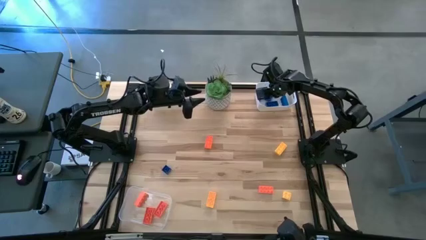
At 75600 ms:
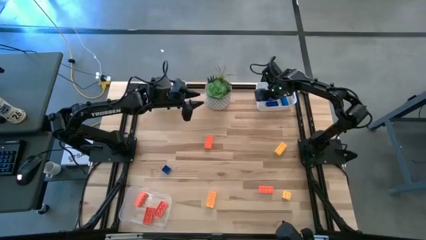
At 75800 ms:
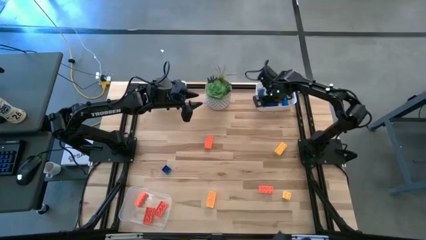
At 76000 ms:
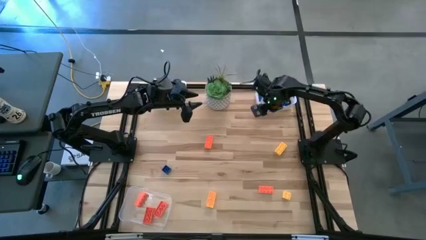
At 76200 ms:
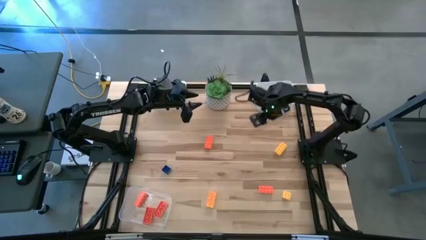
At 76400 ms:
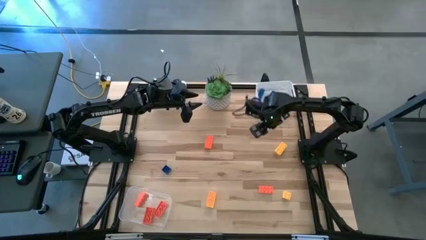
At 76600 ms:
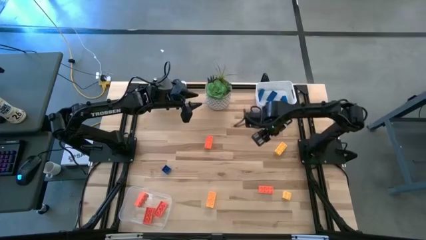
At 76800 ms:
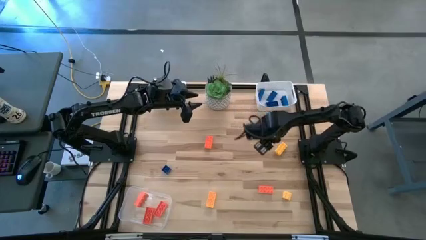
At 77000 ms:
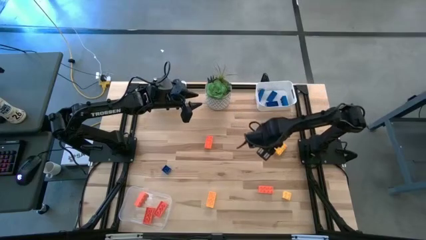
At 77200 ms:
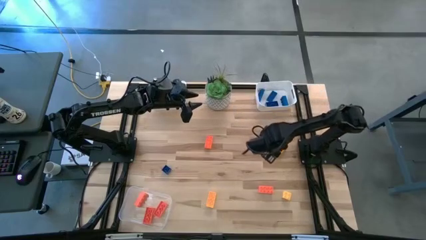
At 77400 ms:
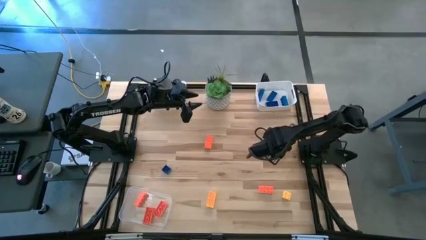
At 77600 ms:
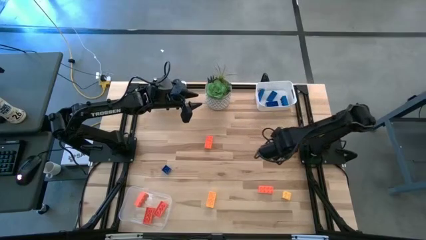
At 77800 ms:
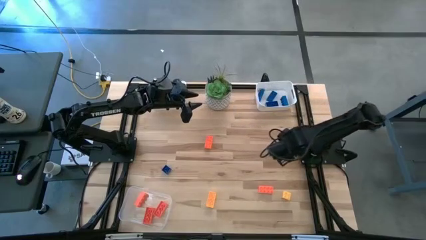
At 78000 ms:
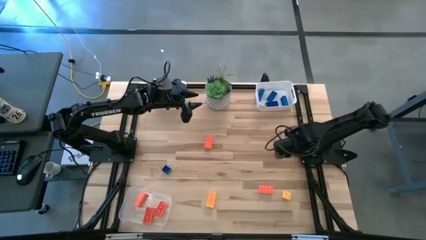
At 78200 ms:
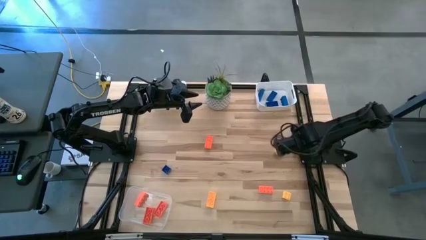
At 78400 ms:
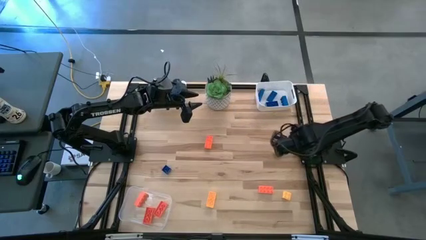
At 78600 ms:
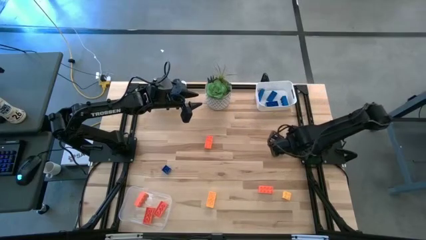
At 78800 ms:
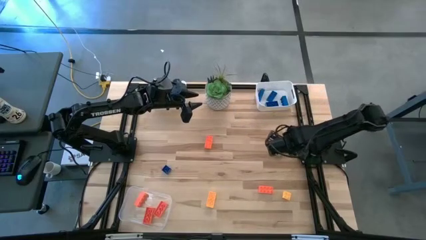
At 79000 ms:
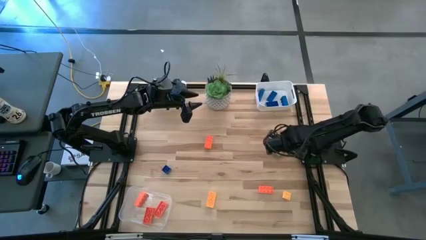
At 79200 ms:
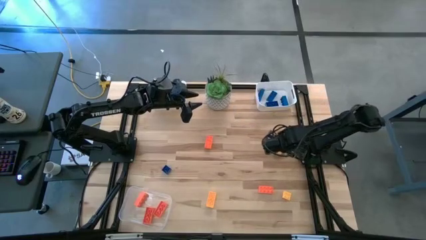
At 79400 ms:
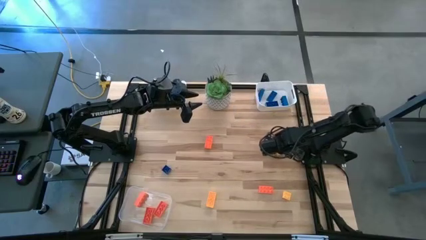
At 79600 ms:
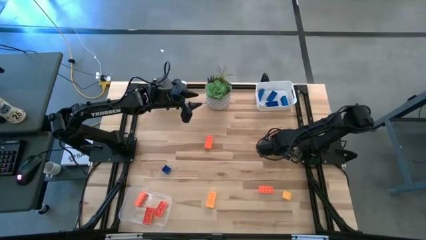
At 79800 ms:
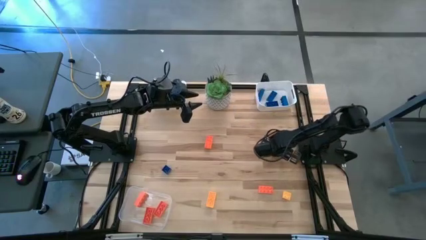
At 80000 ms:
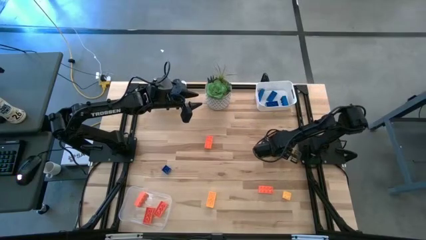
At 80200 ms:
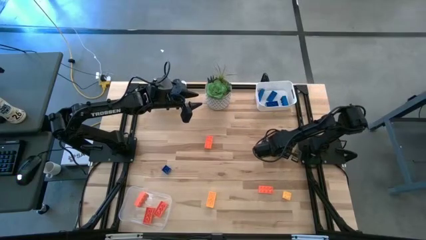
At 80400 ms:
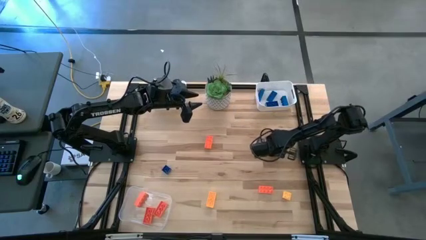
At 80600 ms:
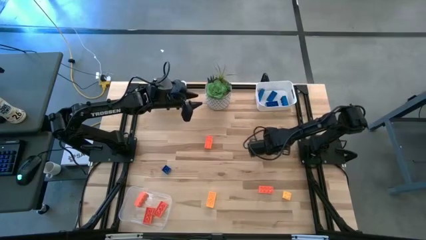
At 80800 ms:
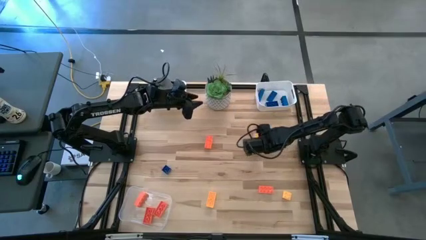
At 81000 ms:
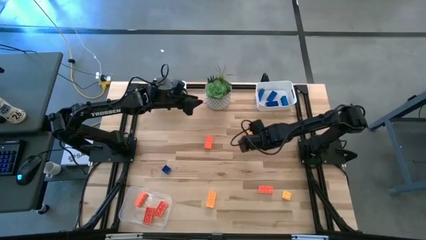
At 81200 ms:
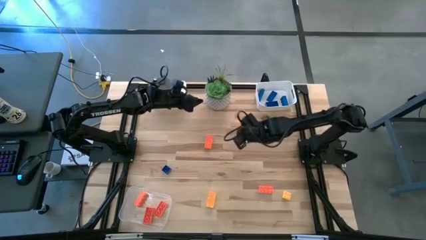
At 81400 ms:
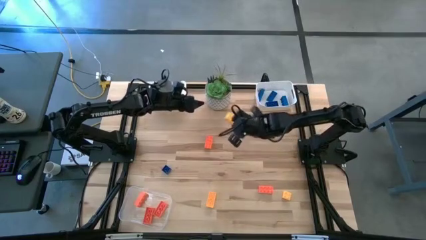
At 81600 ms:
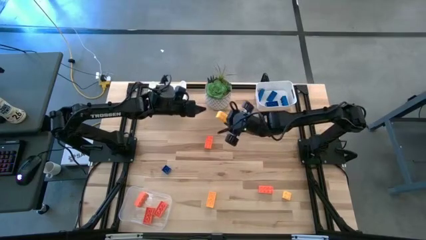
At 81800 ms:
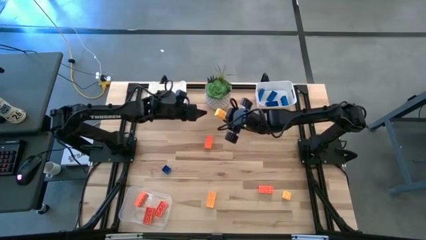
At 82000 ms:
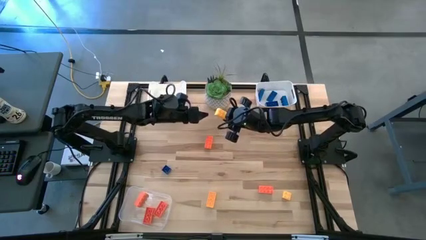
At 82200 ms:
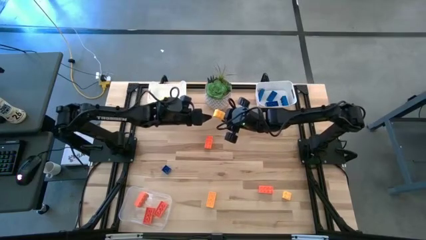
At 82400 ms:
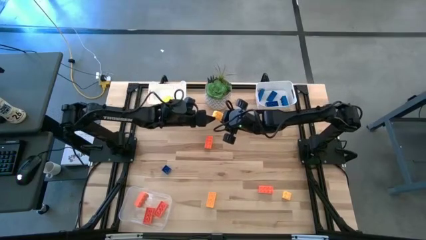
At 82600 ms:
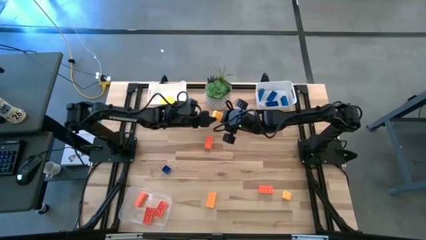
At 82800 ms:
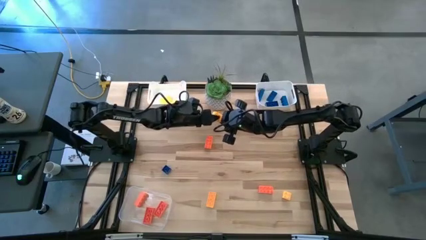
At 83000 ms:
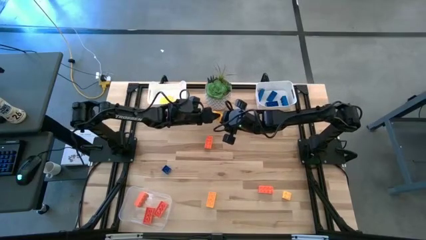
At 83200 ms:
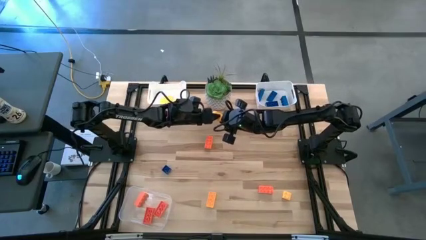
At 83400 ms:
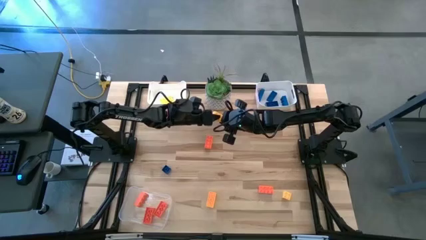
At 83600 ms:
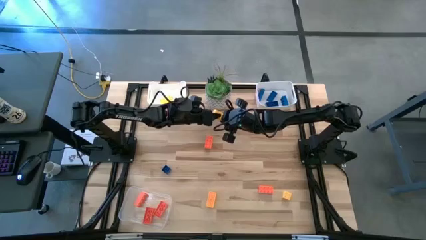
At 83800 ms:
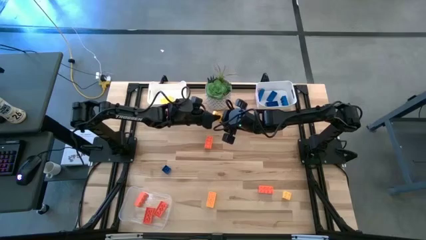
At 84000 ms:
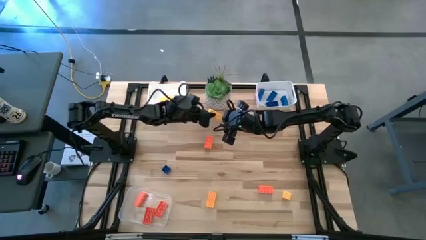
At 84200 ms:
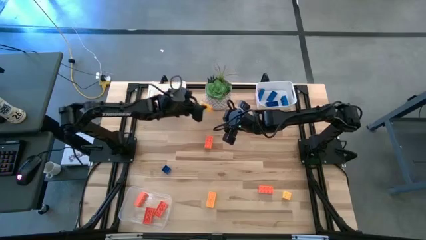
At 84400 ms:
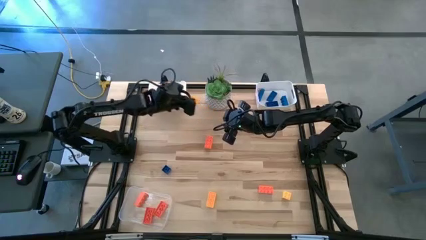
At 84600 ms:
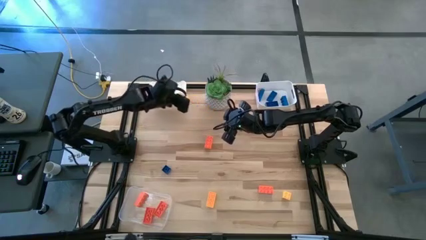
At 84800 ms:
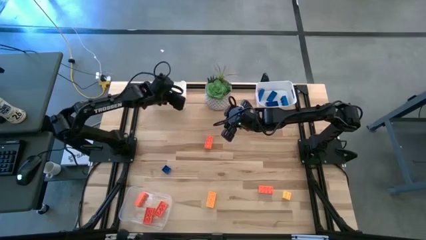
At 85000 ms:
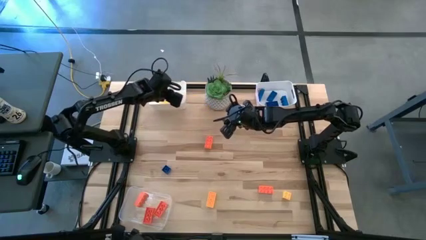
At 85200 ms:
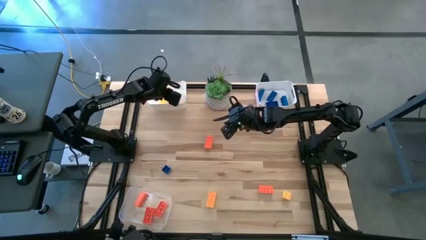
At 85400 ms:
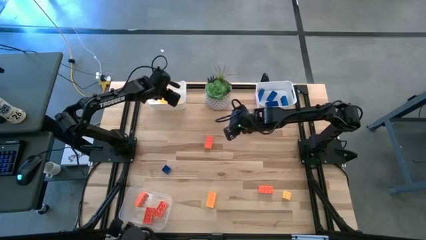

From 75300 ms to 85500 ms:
Task: Sort & place blocks by color
Put the yellow game piece into the left white bin

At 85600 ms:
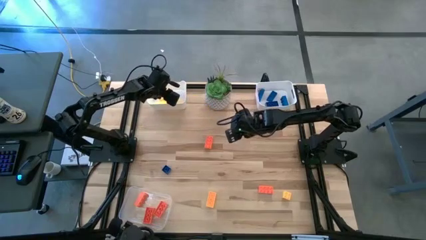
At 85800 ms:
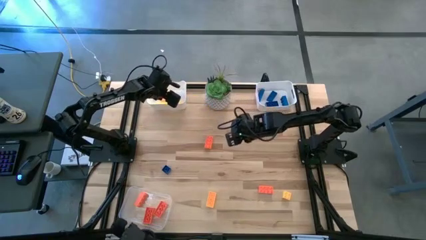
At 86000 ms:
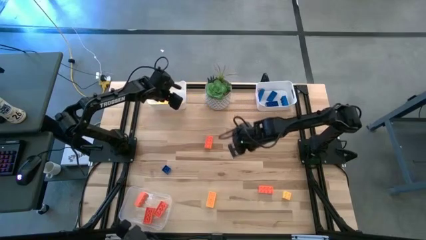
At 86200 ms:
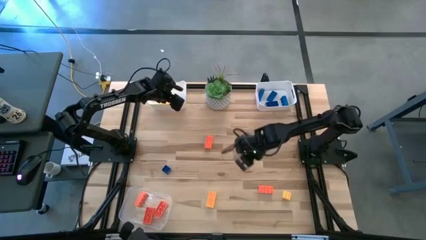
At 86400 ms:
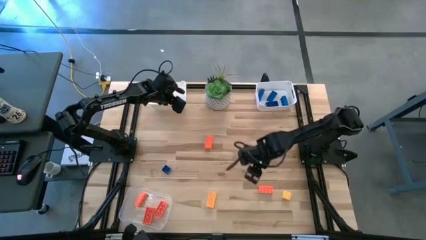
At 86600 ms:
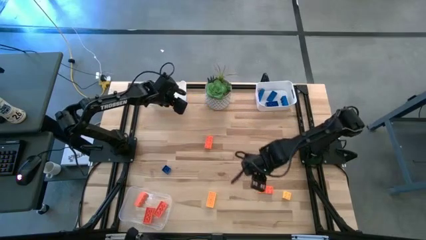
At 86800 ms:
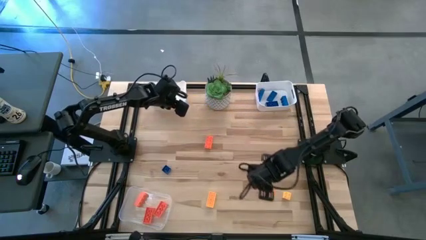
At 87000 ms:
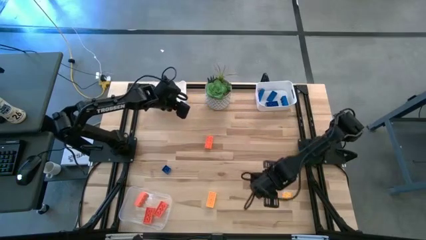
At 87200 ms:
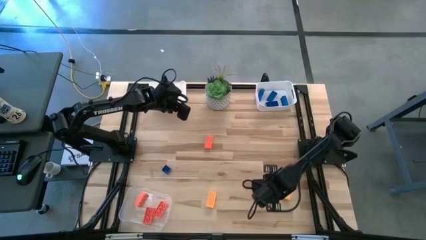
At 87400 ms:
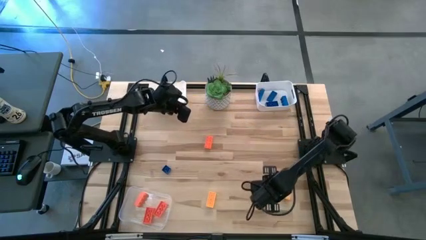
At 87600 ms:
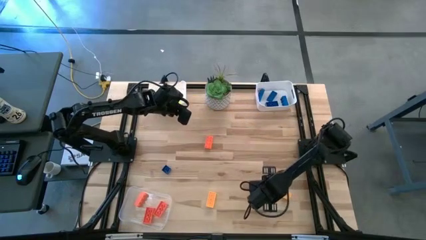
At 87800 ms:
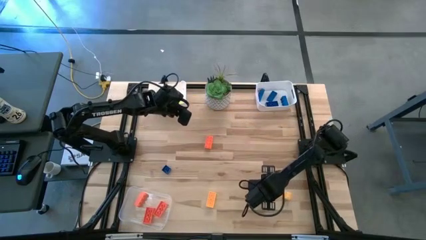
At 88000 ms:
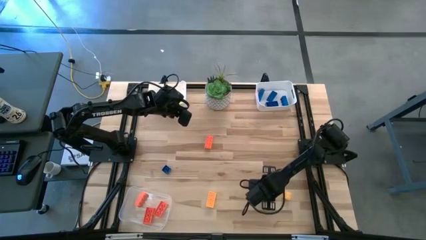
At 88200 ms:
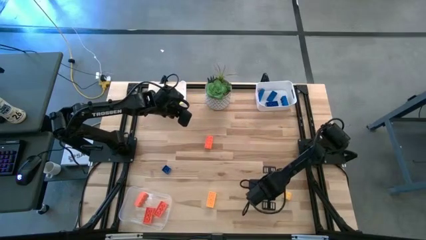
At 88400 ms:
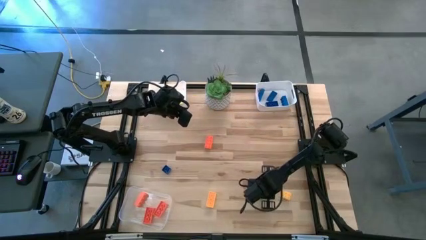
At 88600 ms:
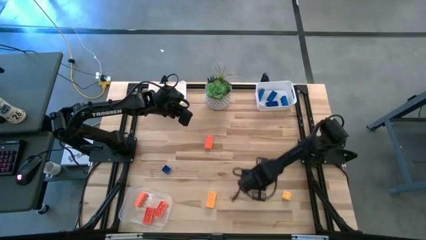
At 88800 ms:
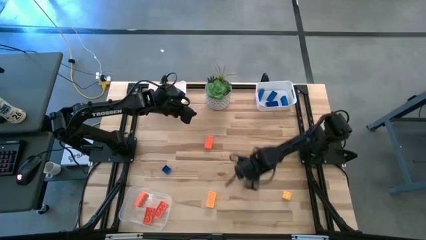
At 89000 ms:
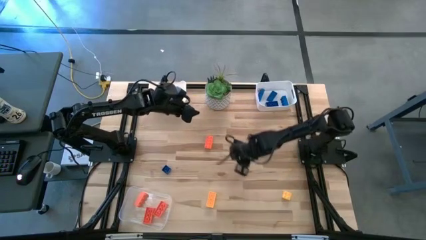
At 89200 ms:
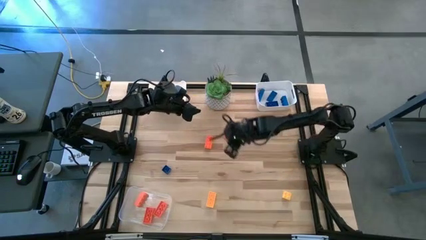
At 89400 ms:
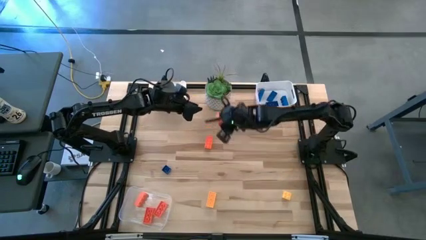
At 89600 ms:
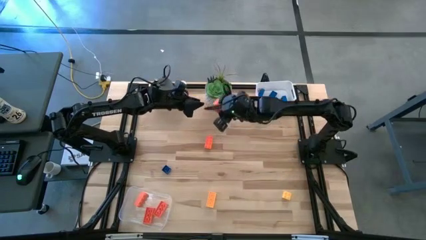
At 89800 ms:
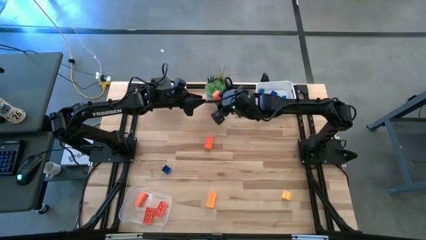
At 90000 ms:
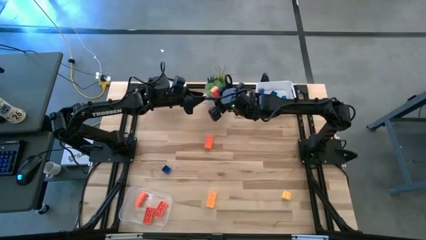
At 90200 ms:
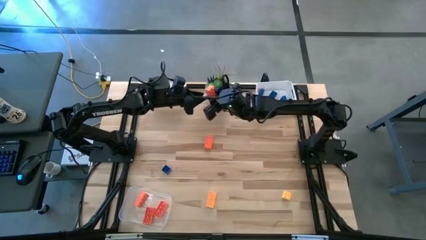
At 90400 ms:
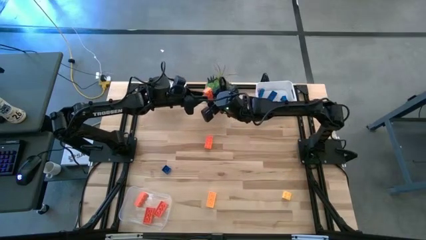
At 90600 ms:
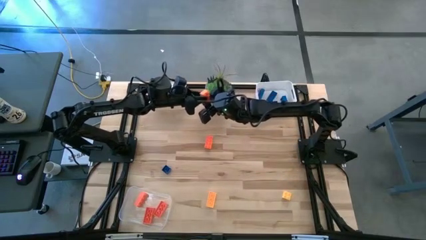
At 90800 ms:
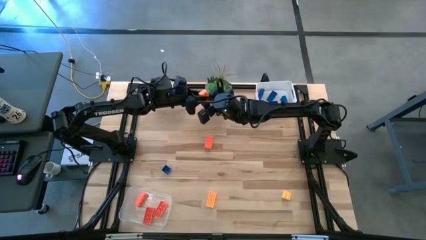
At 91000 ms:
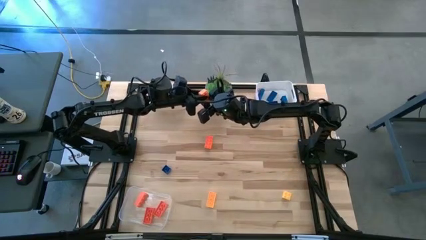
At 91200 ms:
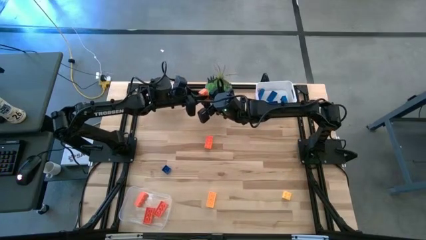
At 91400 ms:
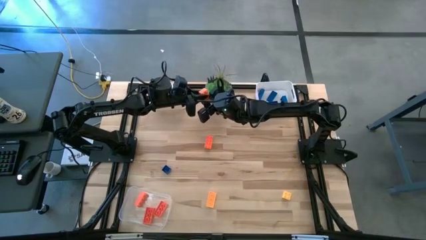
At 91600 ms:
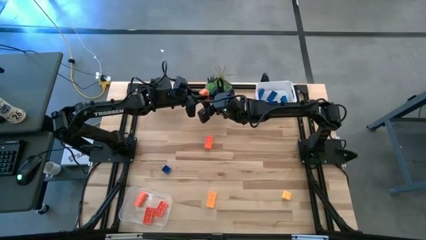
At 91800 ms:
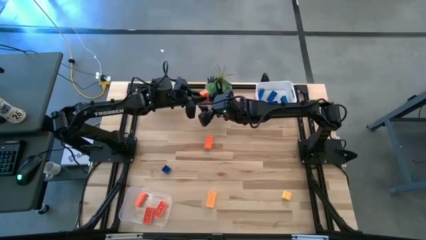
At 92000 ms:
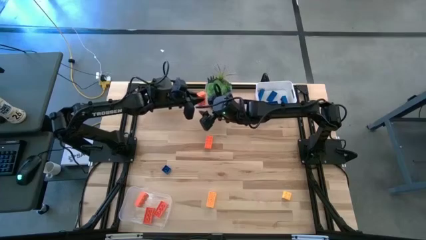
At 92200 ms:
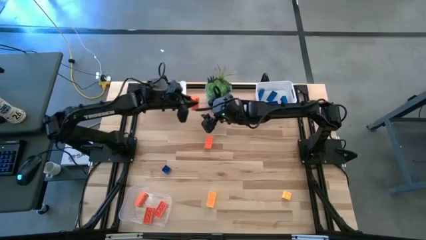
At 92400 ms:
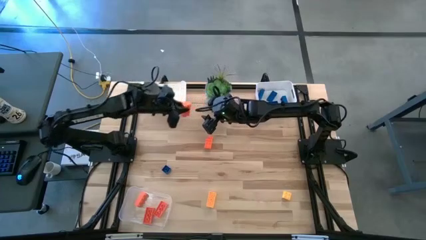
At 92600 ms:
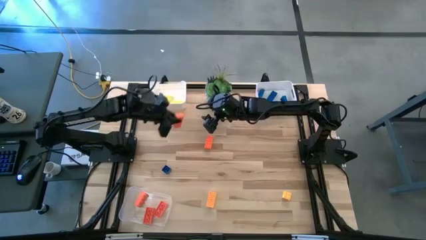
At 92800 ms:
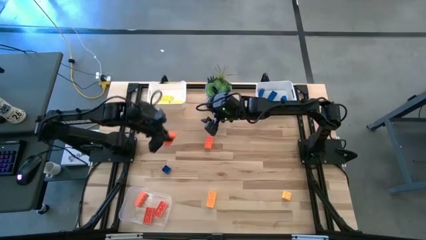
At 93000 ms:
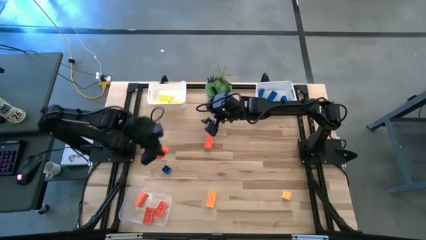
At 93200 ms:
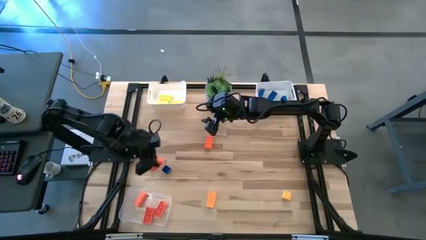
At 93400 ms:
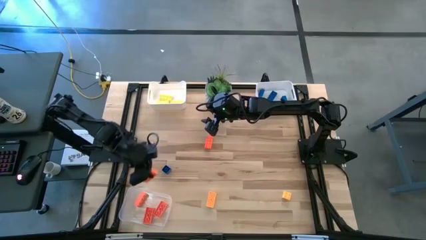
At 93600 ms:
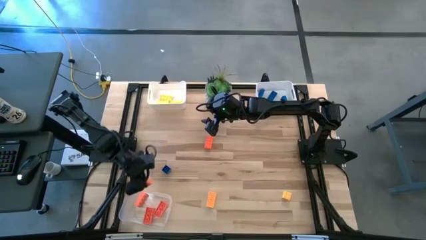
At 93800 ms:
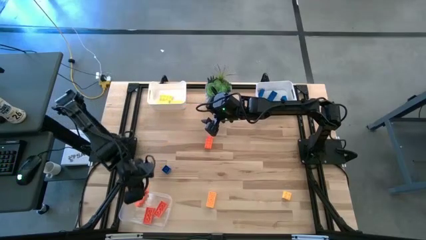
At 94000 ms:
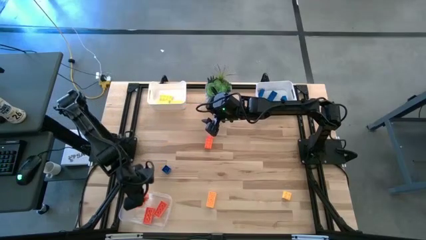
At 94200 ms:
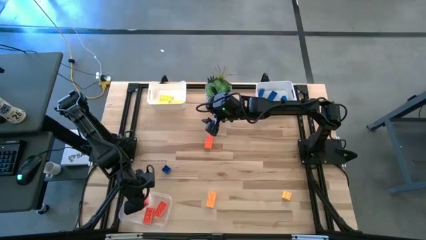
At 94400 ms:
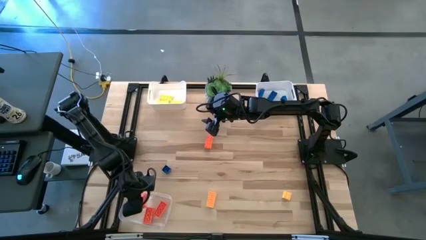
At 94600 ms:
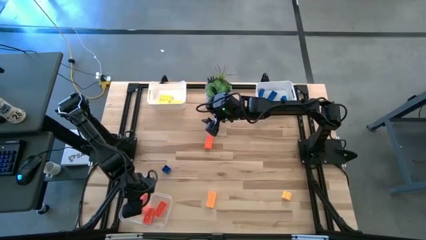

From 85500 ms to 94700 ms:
Put the orange game piece into the transparent bin
